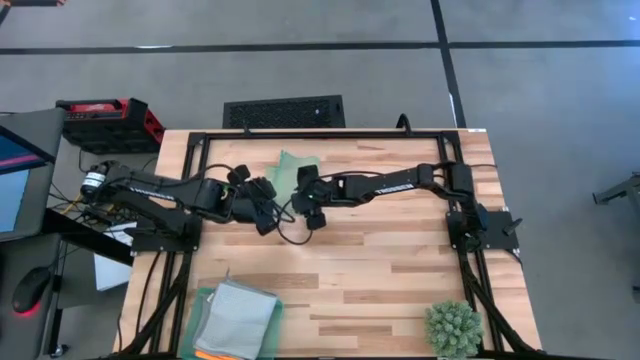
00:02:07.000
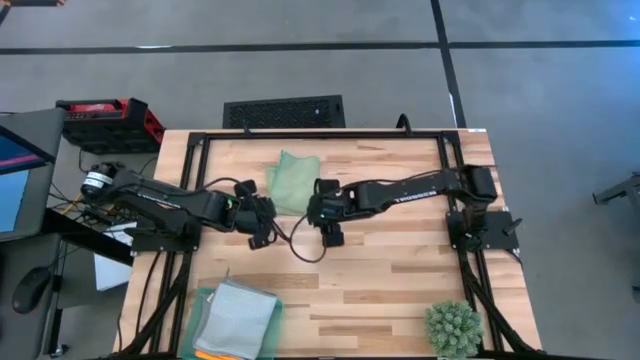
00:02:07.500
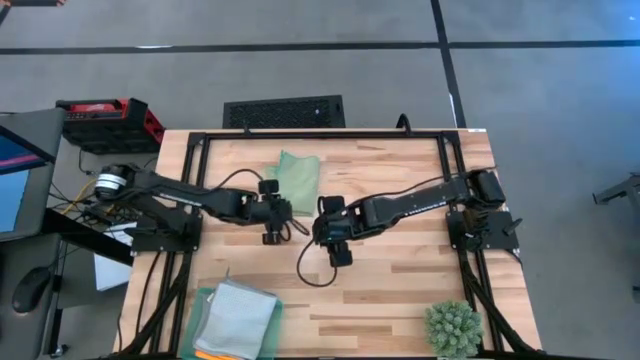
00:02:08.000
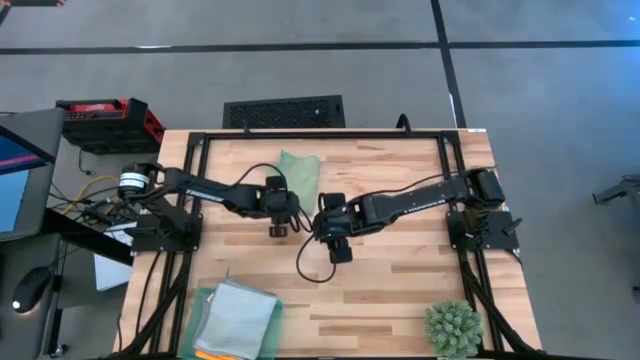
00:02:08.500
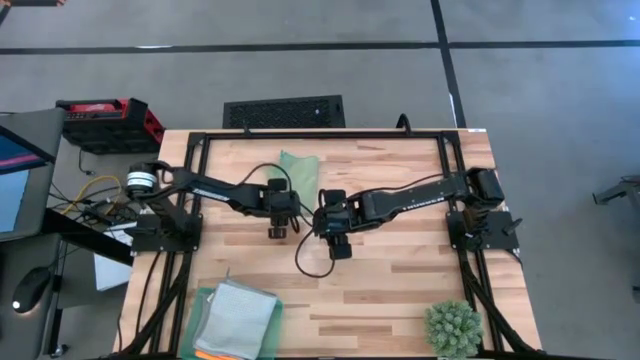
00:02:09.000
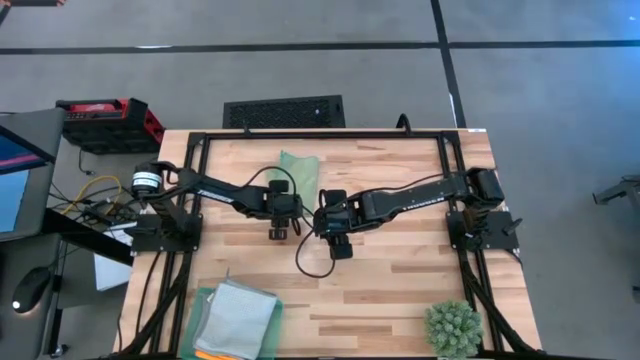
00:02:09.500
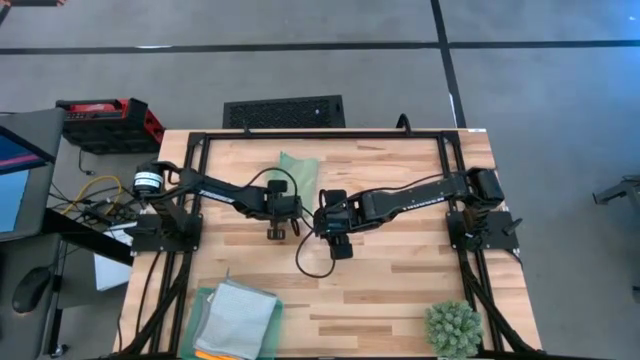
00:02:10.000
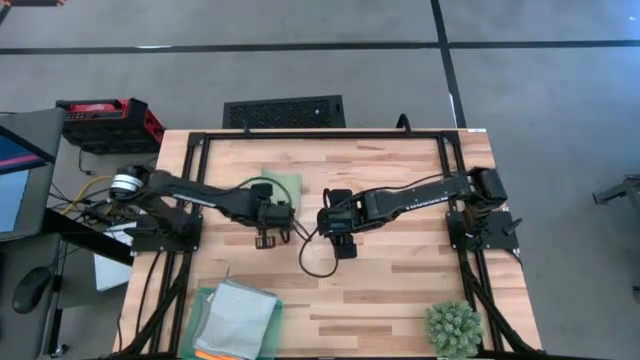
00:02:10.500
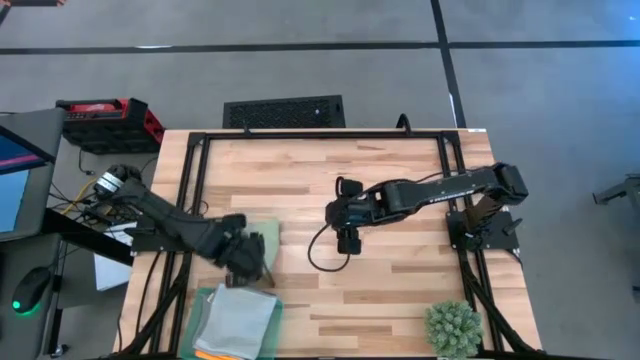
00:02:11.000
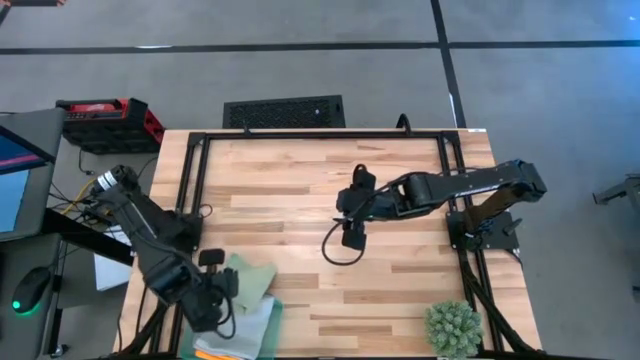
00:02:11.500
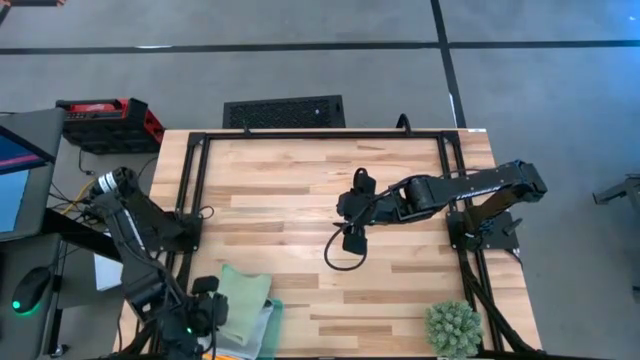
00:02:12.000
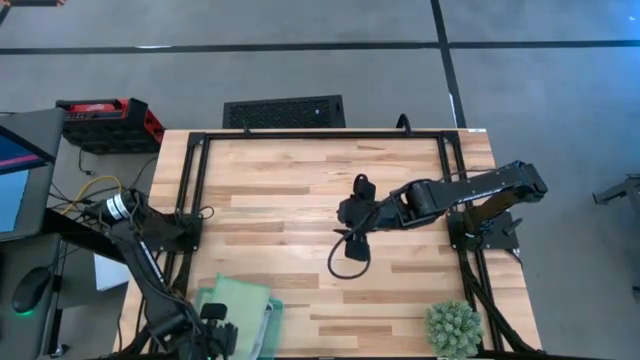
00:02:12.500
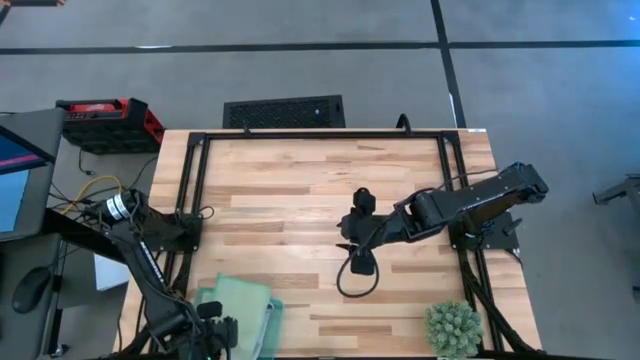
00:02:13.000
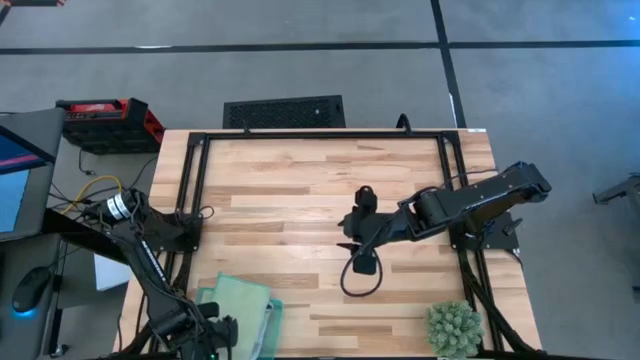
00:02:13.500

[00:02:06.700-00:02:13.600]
Task: Fold microfiber towels
Put the green microfiber cloth into the green bin

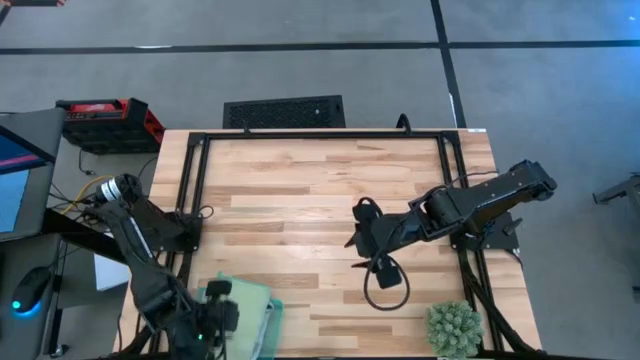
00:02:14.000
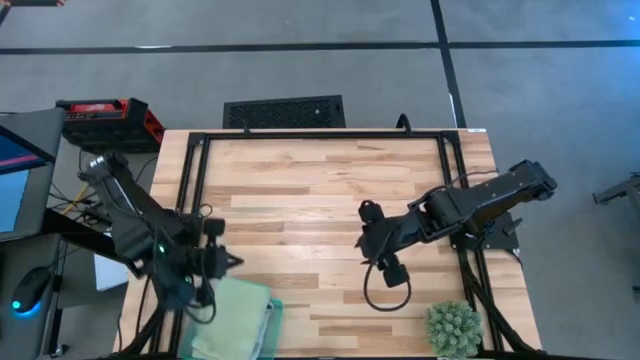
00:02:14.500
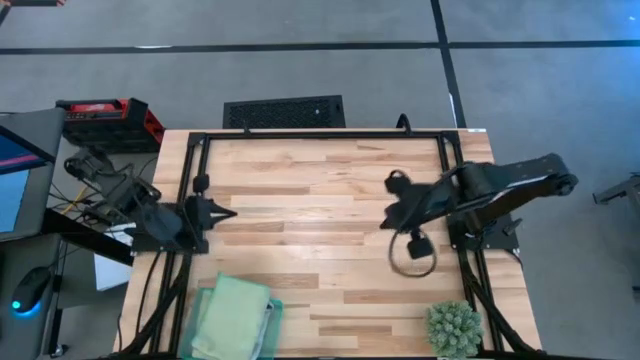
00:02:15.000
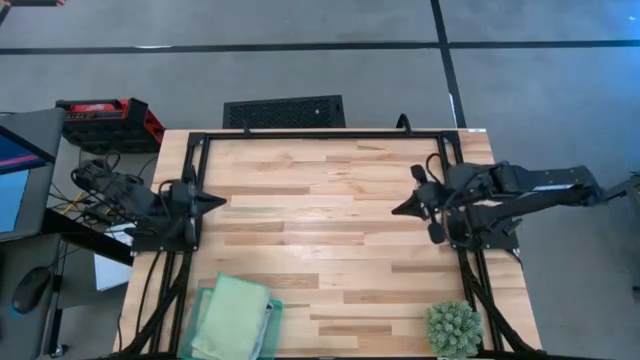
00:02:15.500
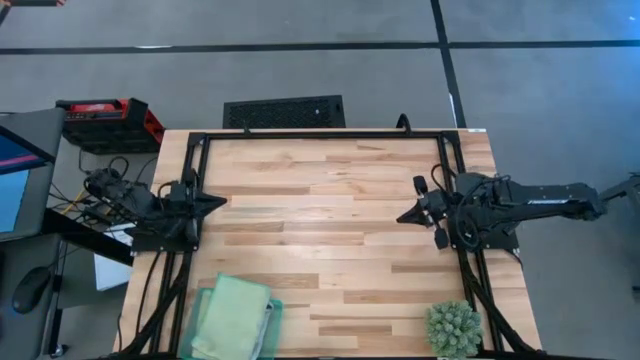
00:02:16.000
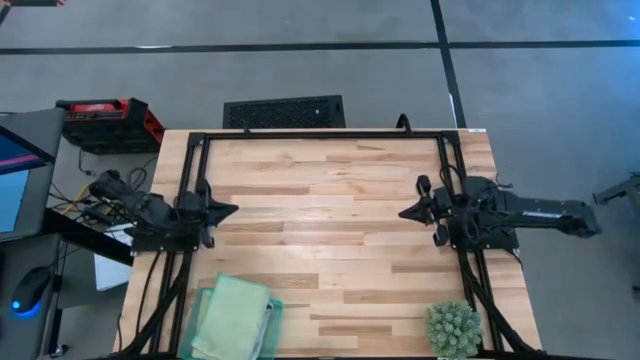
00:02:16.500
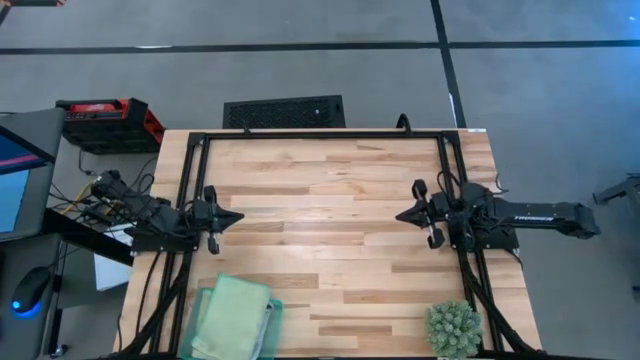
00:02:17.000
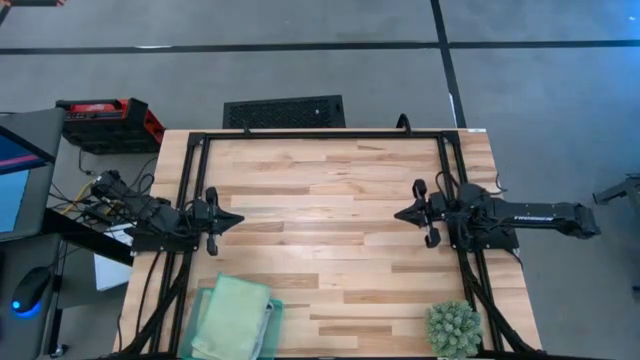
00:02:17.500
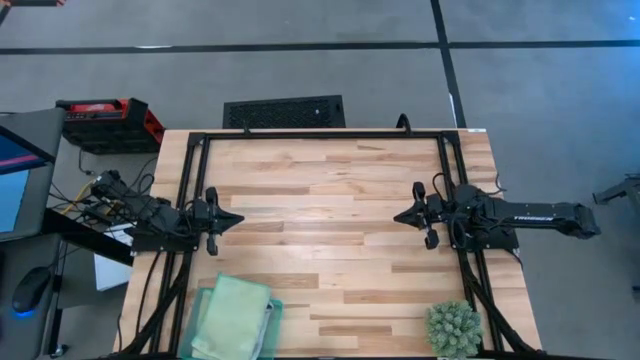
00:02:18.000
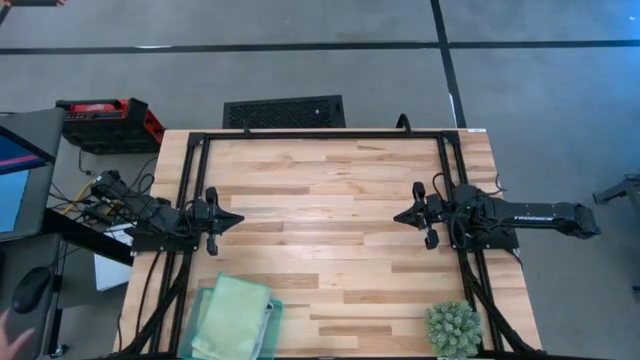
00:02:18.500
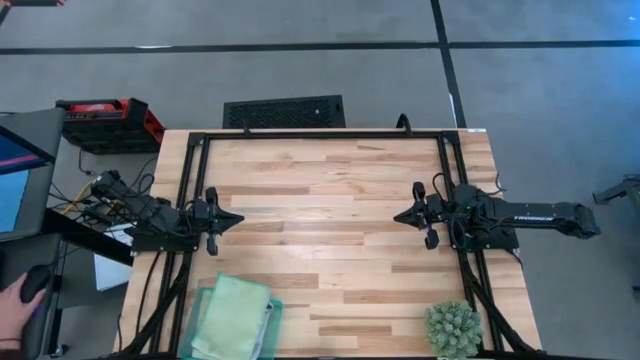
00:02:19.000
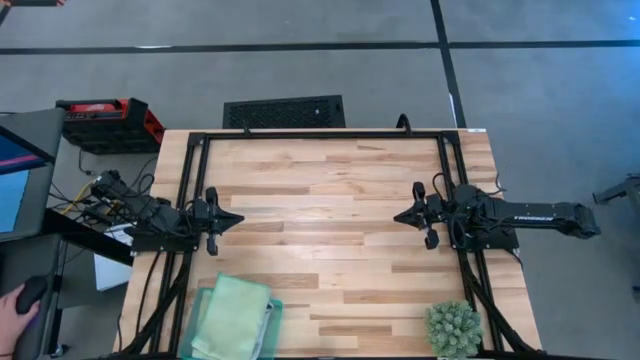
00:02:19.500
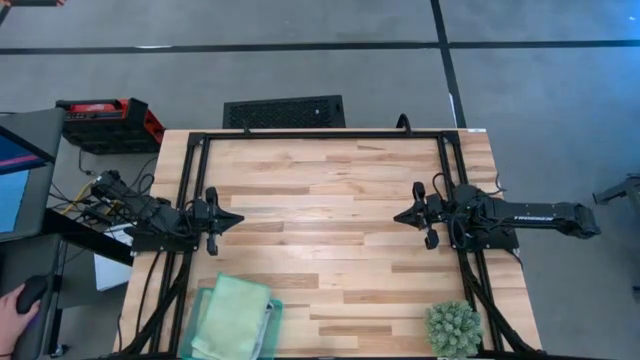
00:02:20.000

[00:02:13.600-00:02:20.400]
Return to Home Position

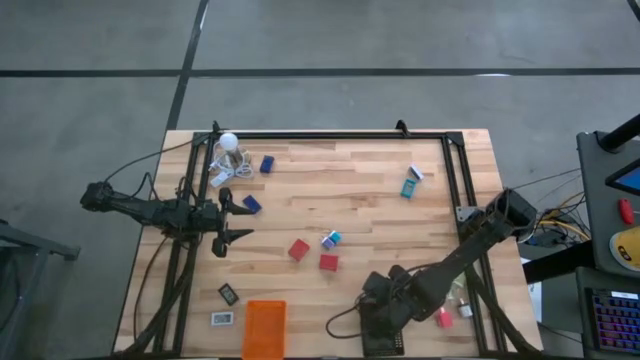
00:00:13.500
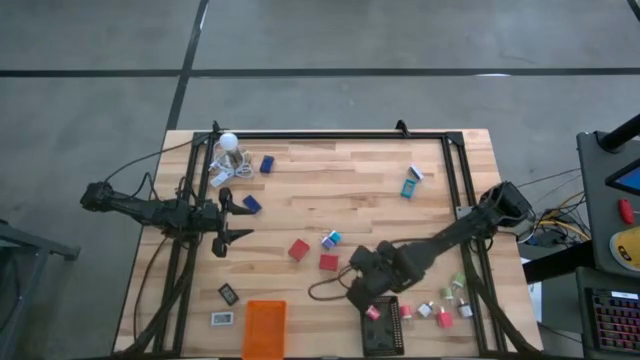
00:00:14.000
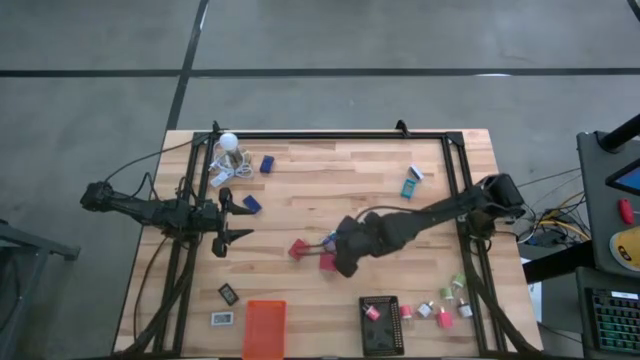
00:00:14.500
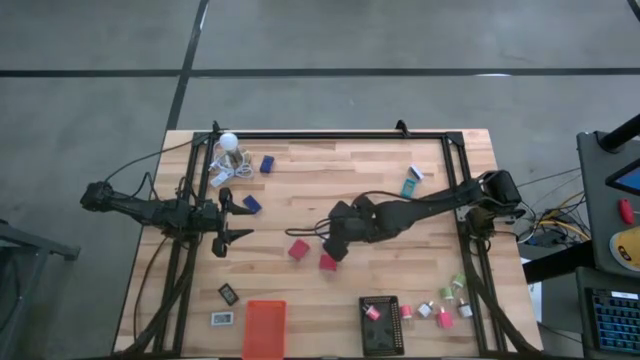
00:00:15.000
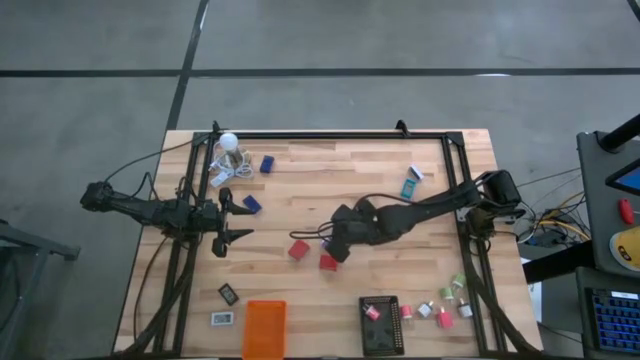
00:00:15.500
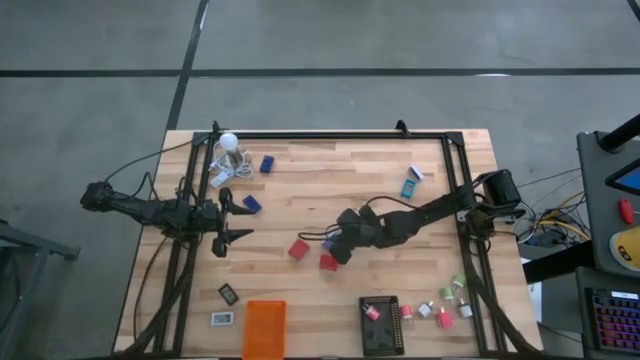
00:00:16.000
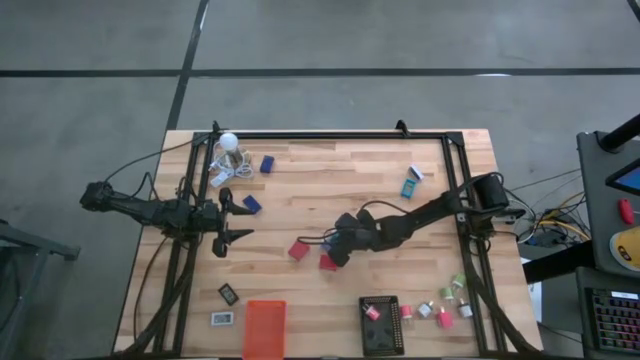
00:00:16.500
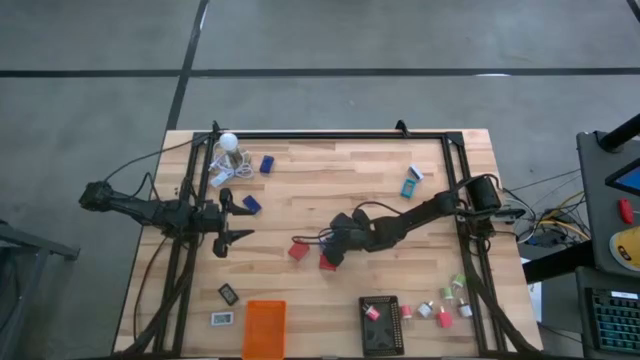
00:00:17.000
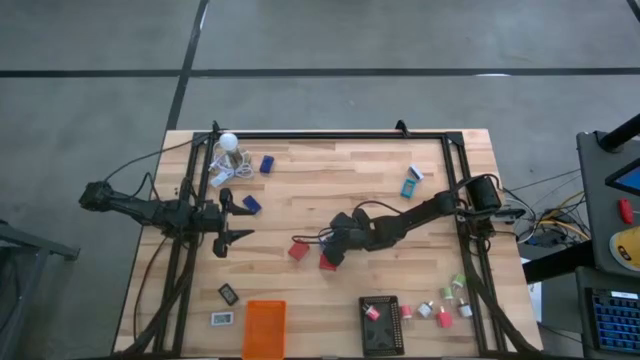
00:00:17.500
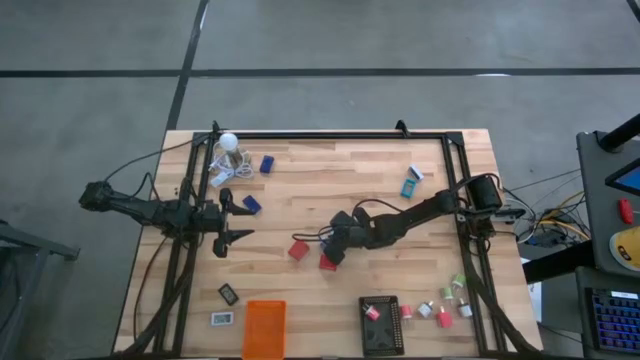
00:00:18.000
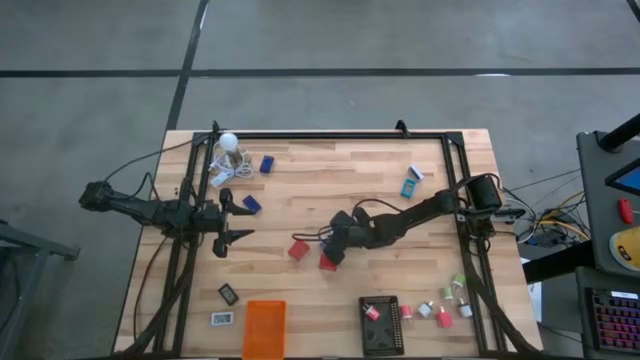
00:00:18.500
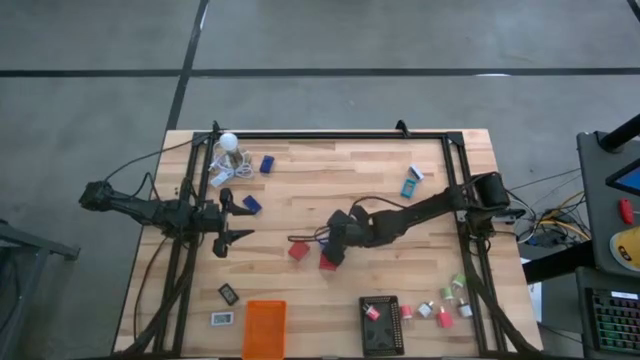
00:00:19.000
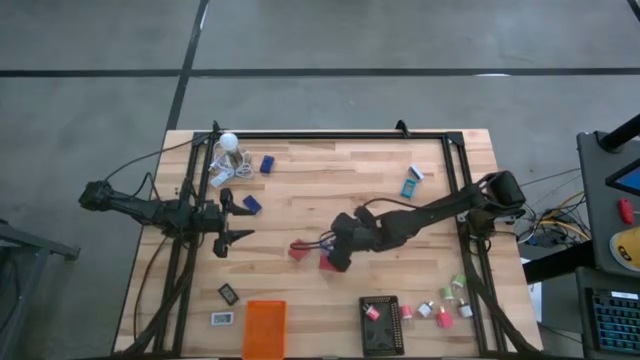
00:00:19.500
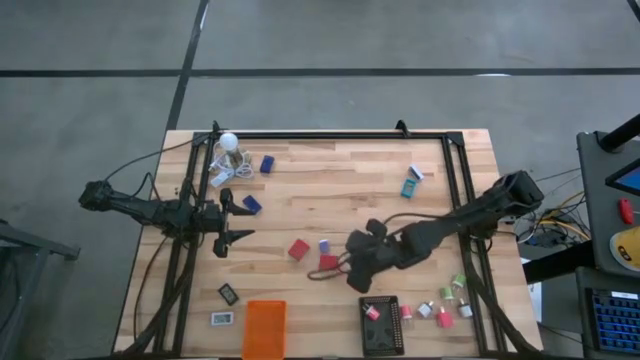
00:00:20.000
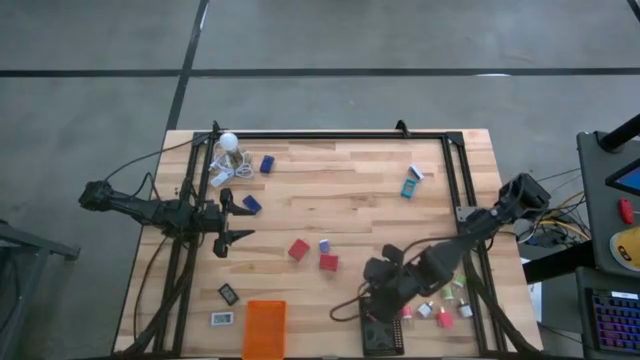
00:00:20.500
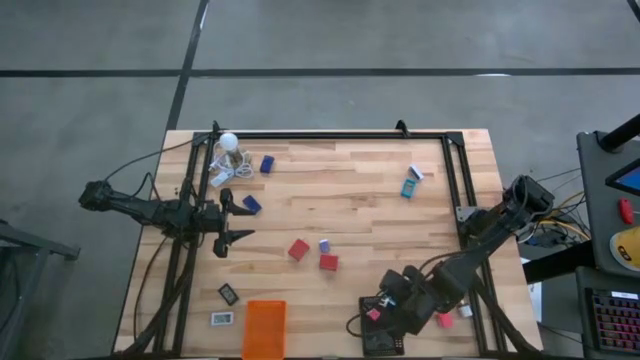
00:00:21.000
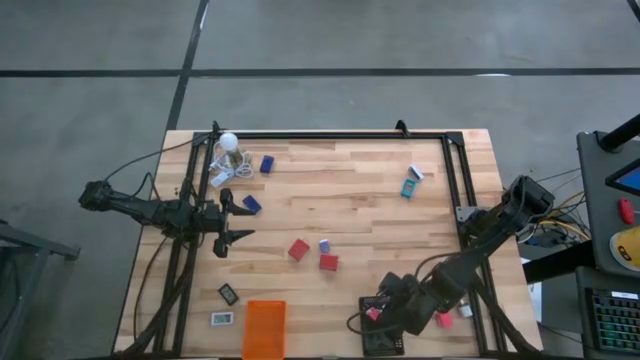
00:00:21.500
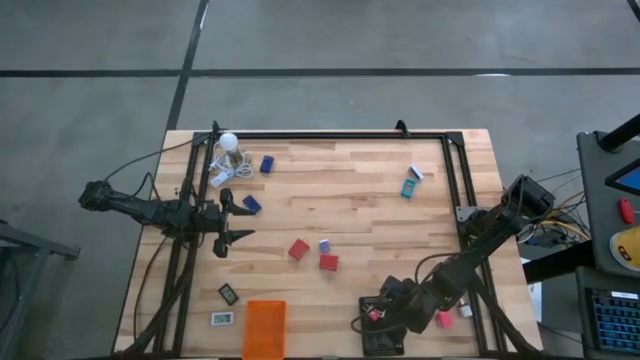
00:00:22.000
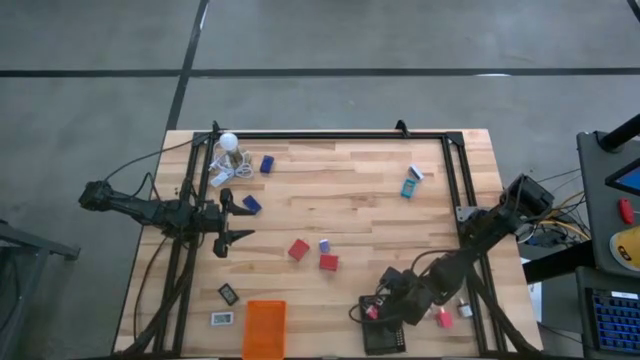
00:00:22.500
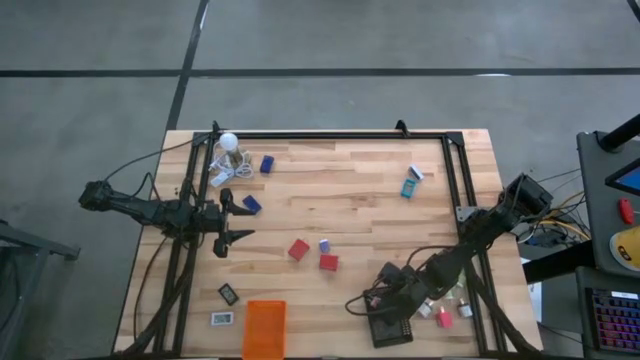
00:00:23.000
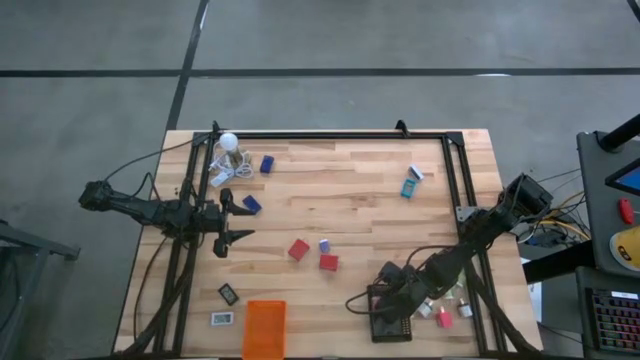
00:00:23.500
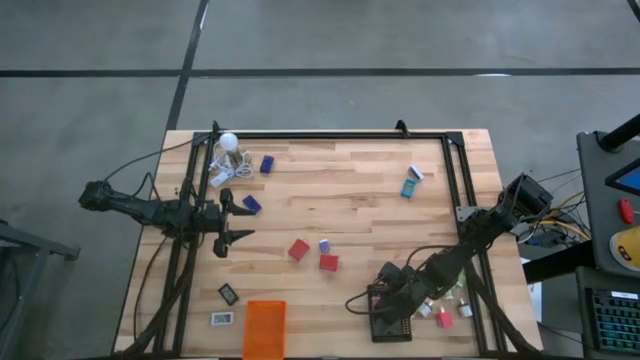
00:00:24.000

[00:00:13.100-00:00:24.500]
Task: Pick & Place Office items
Put the light blue charger adapter into the black bin
